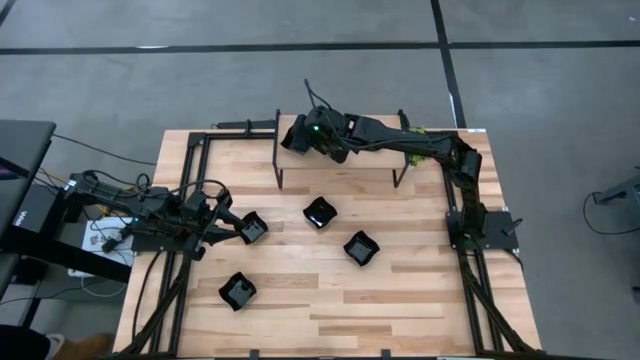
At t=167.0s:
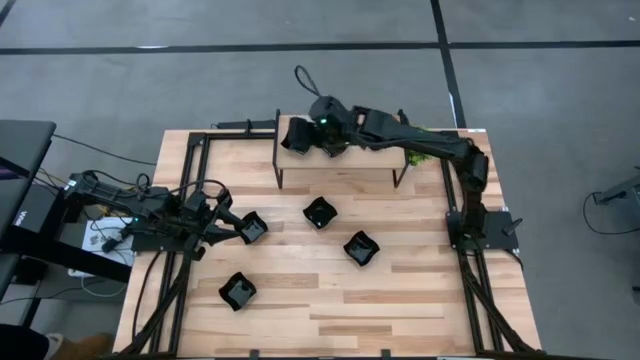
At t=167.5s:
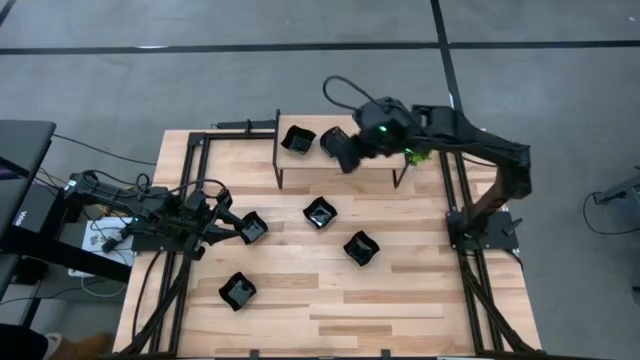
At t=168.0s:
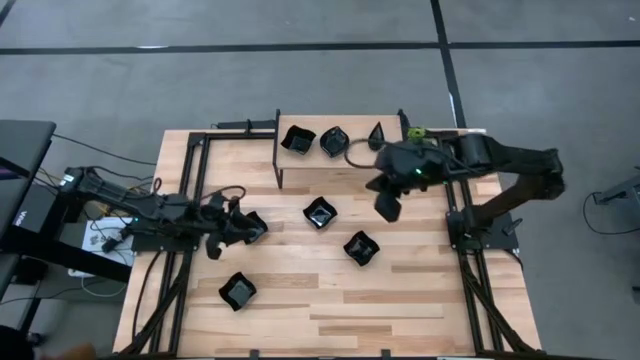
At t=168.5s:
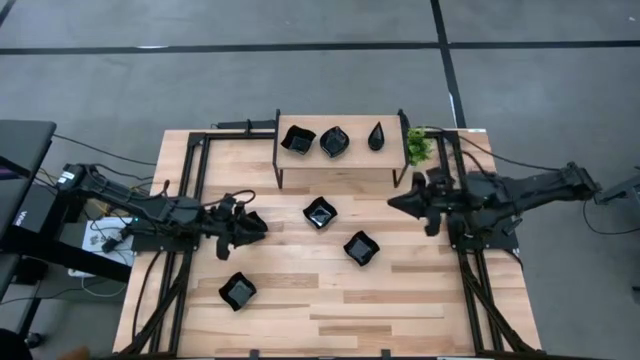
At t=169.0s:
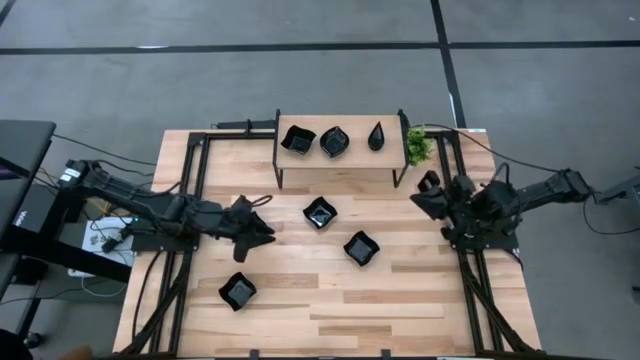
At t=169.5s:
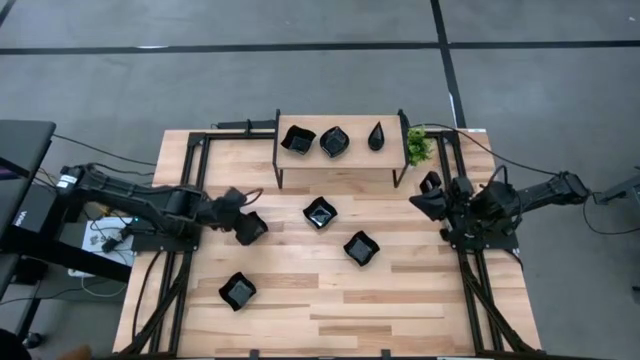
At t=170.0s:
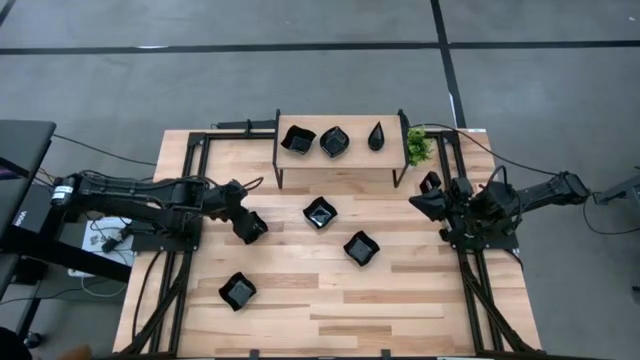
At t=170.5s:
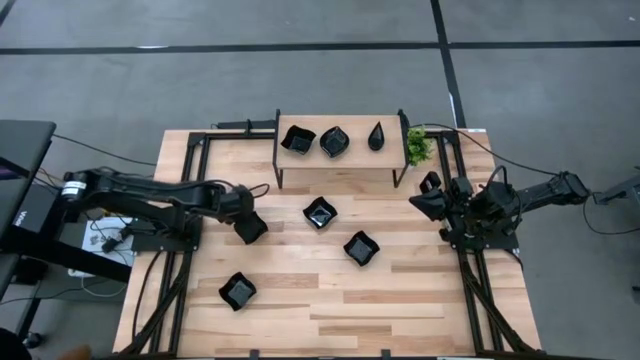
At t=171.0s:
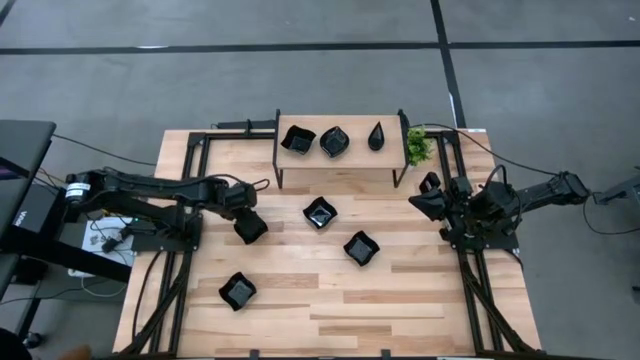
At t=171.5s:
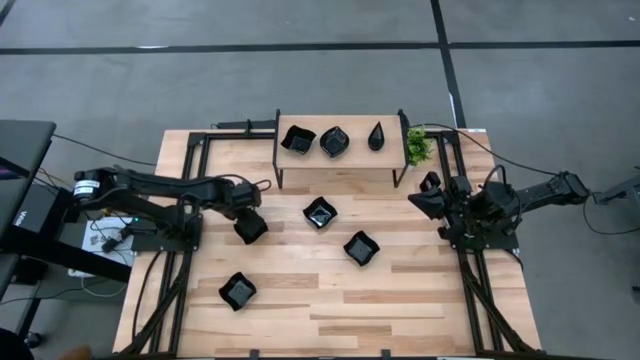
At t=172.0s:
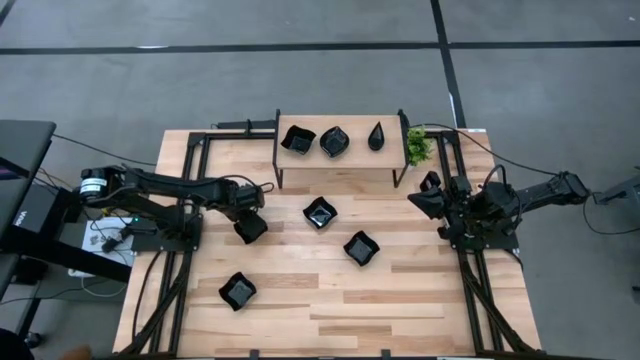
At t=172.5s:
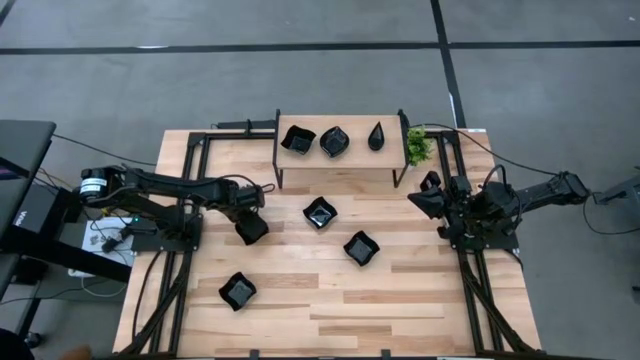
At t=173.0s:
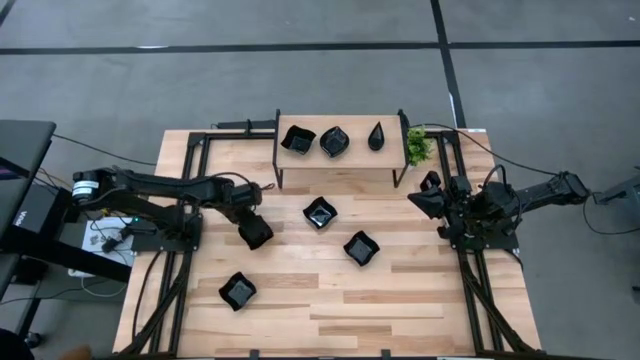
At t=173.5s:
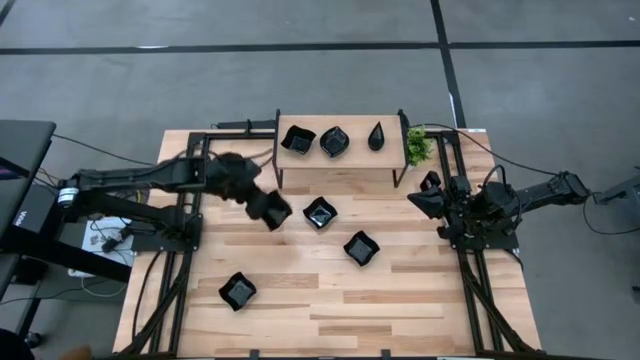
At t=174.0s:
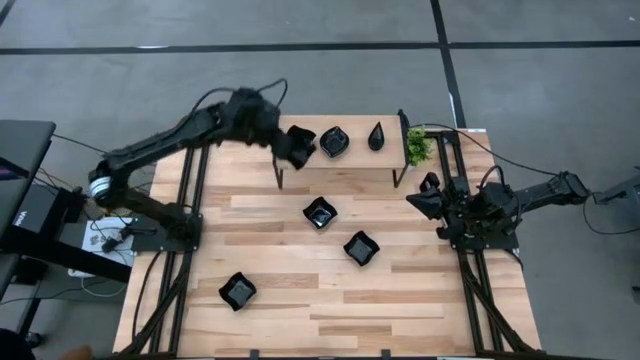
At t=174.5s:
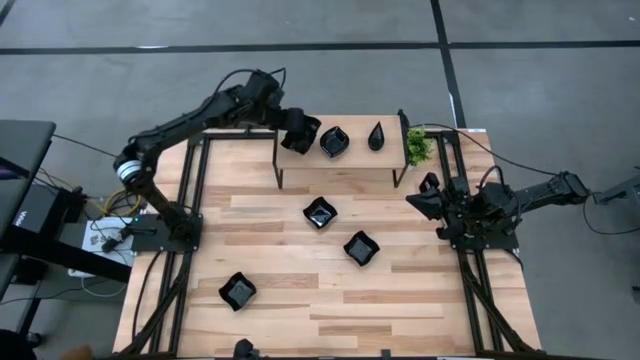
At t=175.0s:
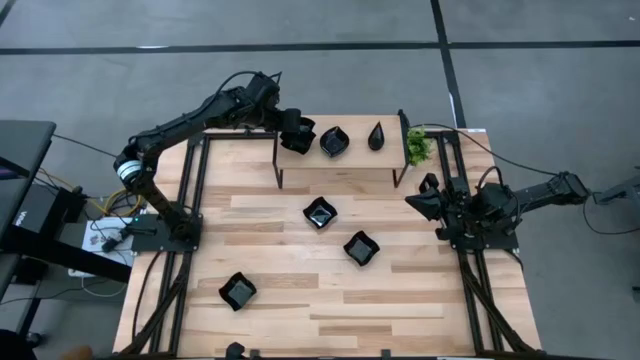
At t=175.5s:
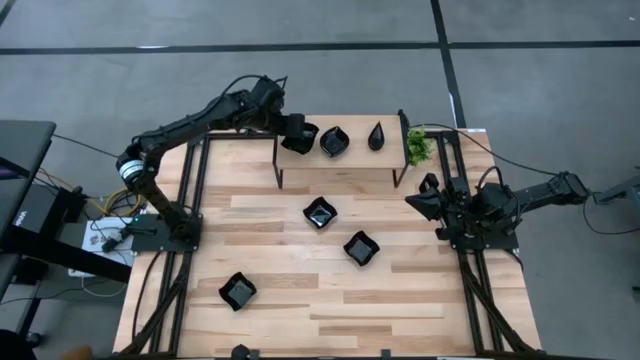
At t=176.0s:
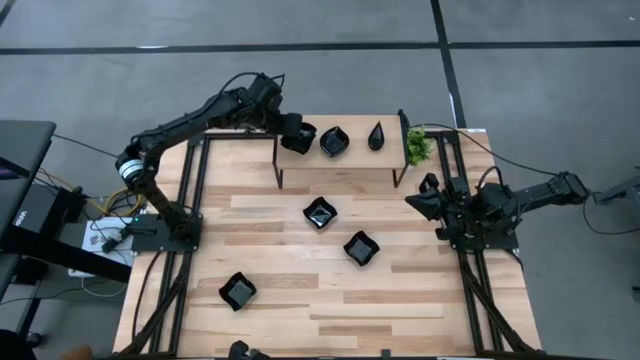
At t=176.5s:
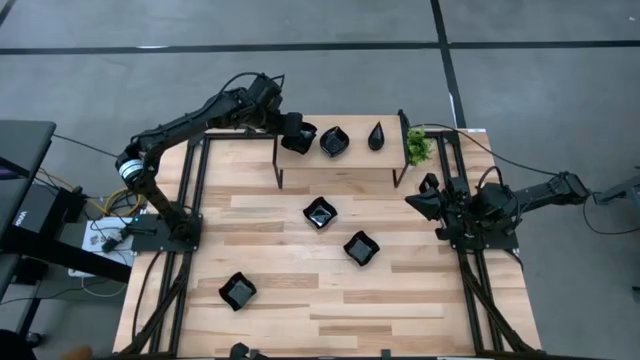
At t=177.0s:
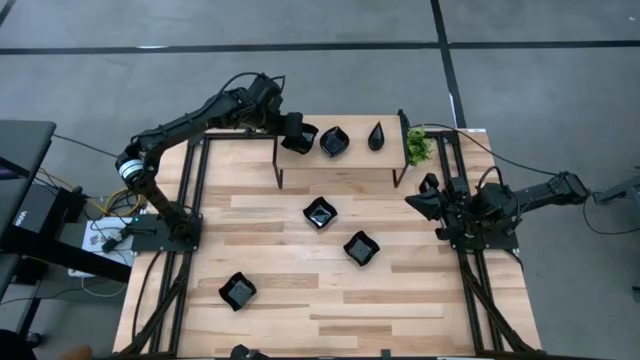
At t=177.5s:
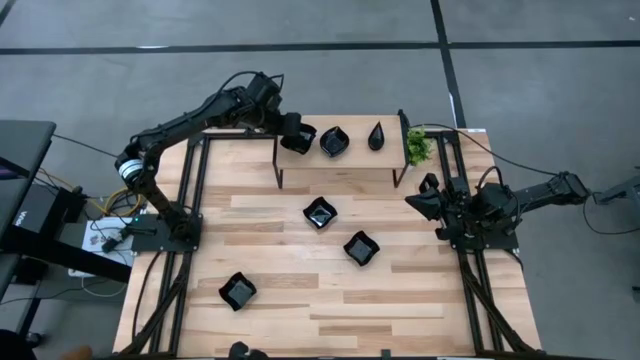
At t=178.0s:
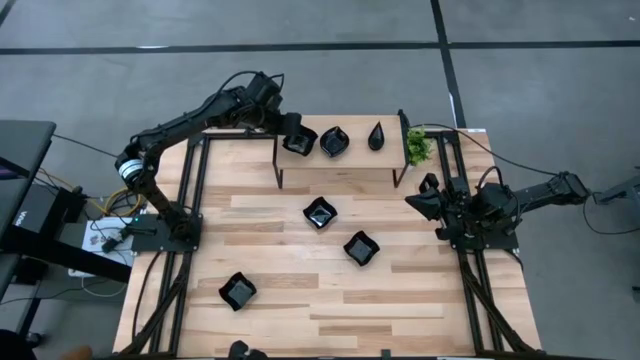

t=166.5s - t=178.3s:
Task: Pick & Place Mini shaped plates
Stack the distorted square plate on top of the other distorted square plate on the shelf

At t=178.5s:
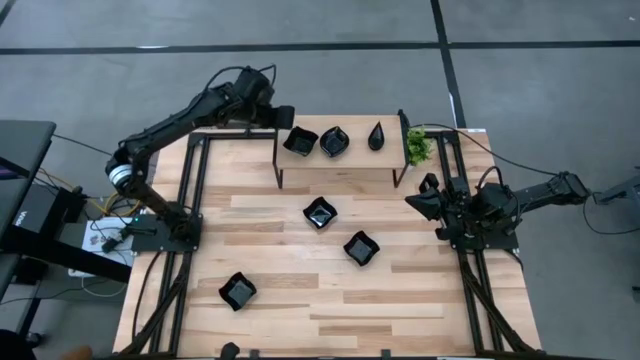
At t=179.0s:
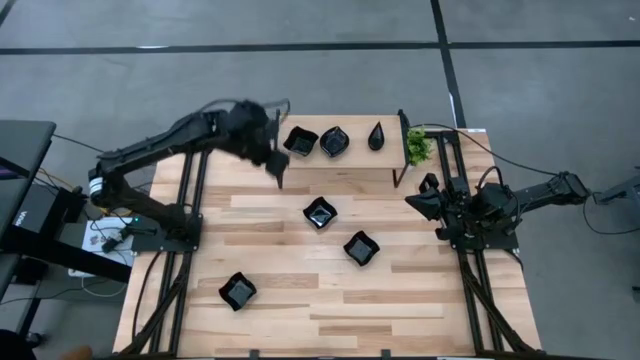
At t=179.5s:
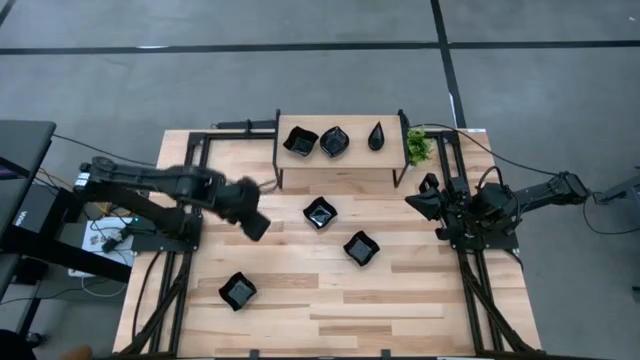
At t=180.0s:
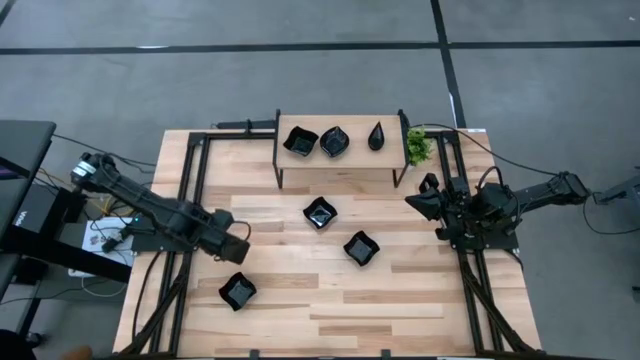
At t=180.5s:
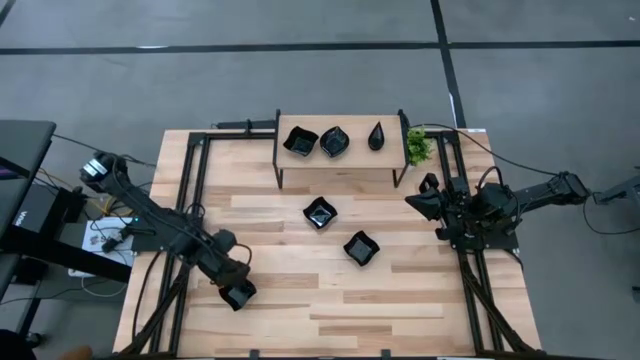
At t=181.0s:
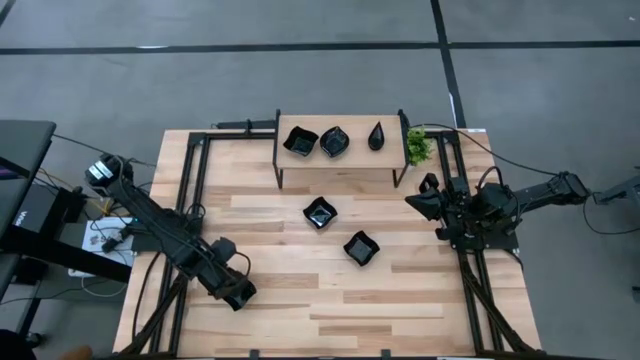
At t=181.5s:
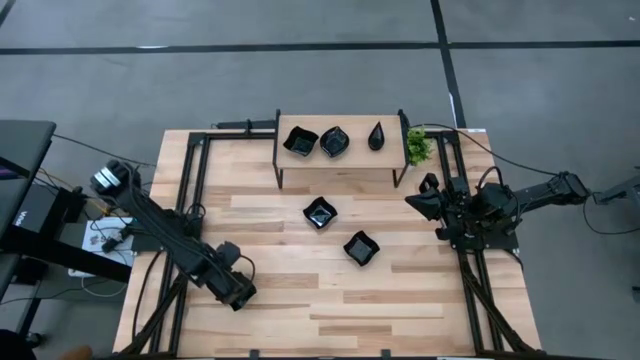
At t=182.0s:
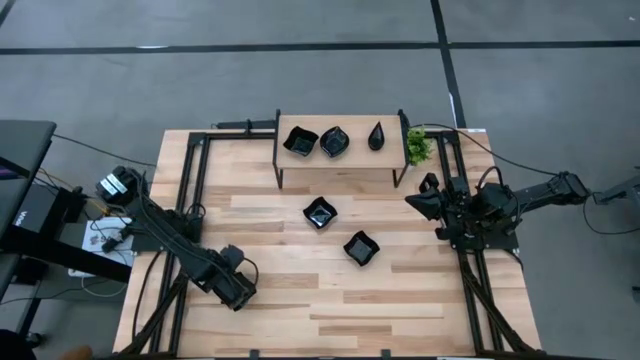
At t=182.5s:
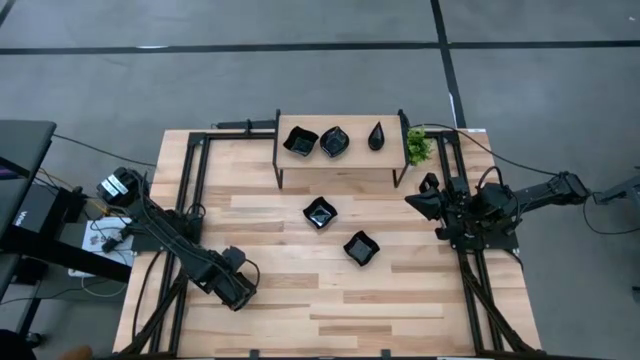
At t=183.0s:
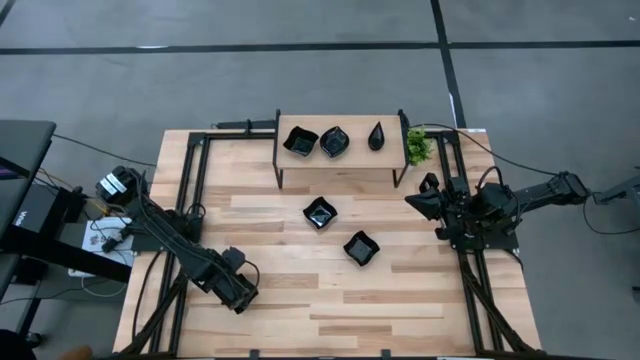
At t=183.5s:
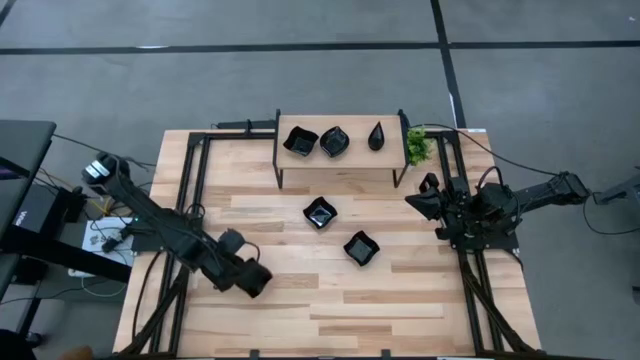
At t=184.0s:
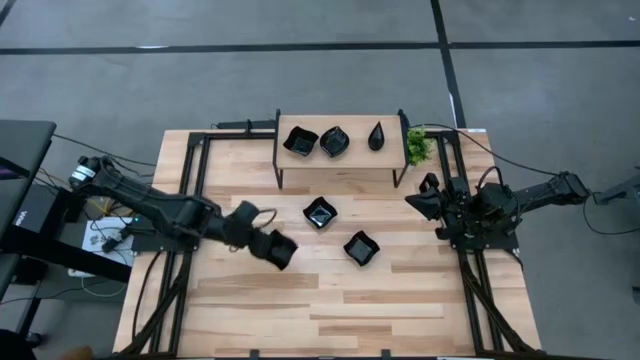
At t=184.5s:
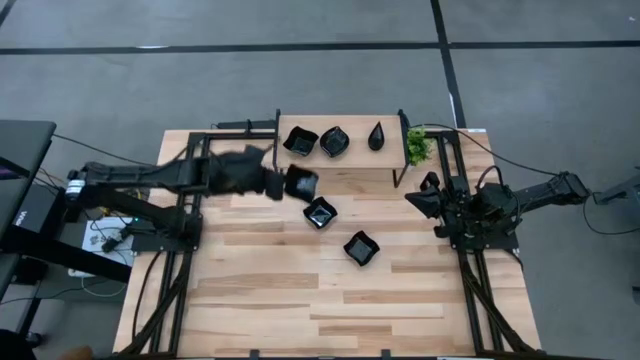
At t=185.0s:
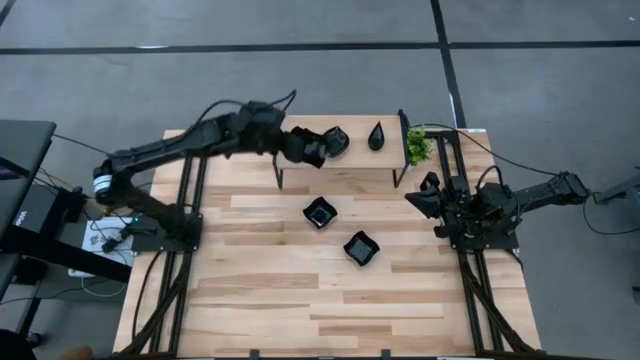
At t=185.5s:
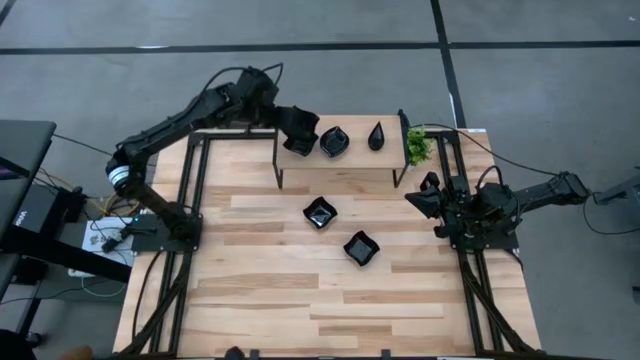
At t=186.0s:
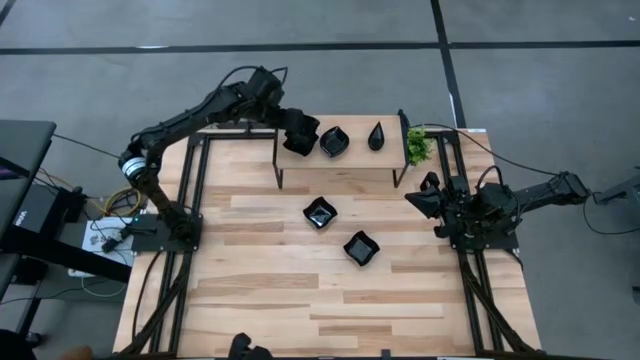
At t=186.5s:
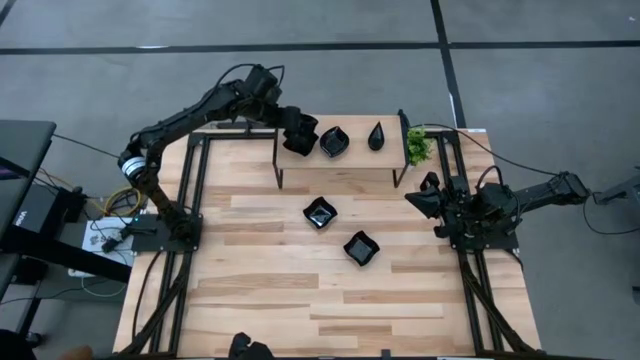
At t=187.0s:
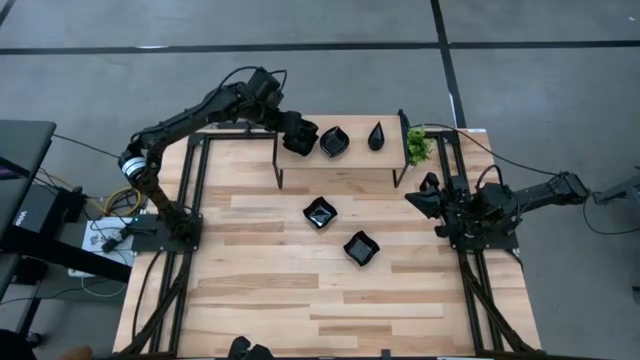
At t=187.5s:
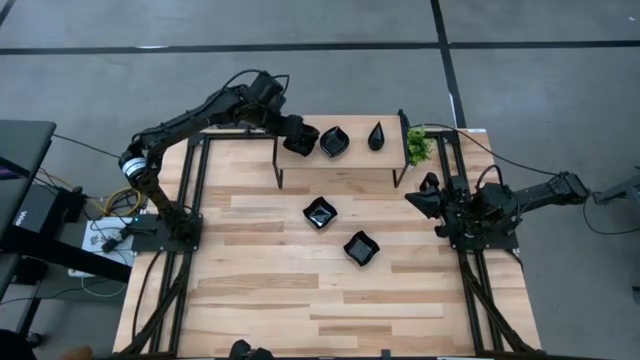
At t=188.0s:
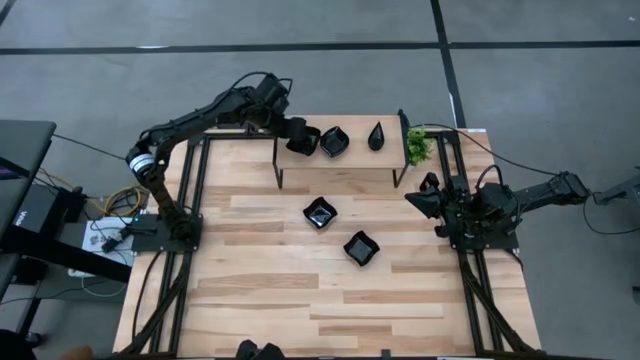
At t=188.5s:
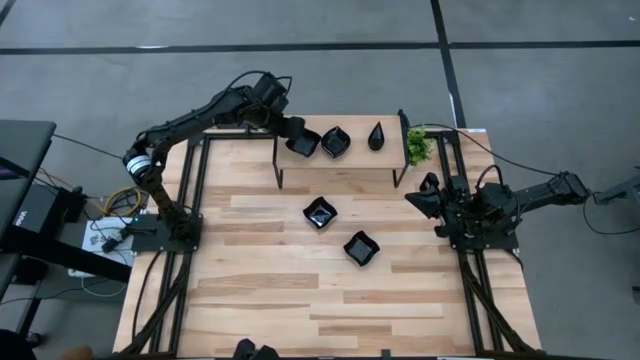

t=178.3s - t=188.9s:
Stack the distorted square plate on top of the other distorted square plates on the shelf
